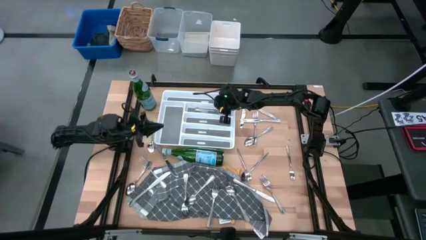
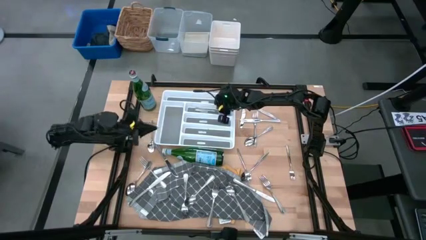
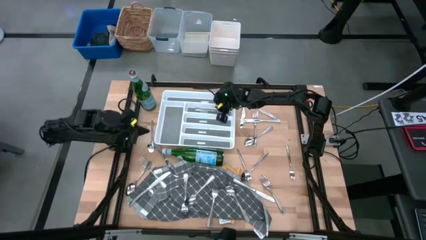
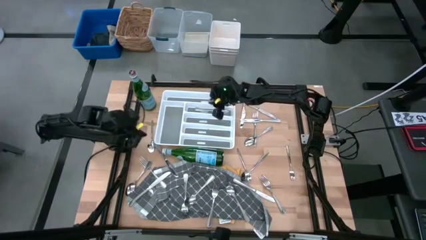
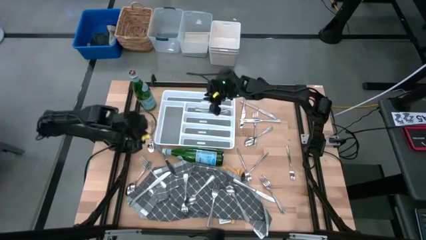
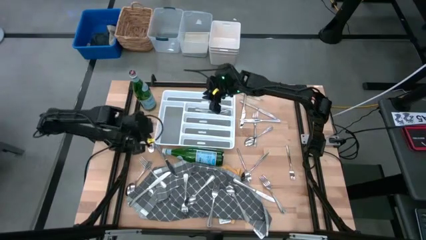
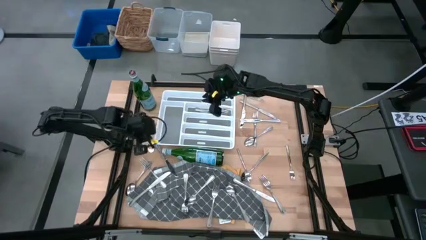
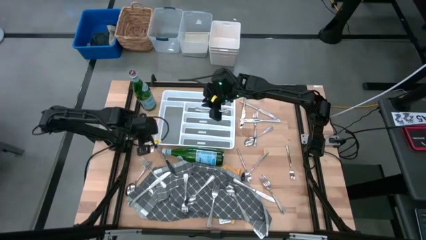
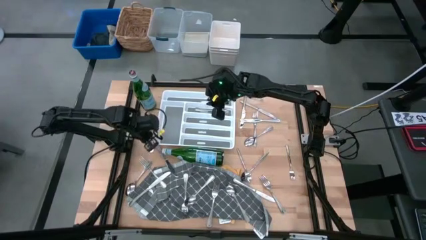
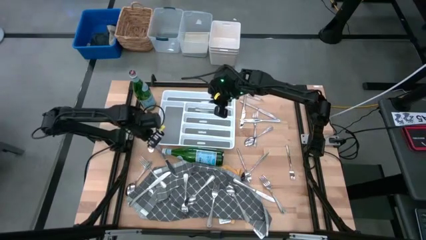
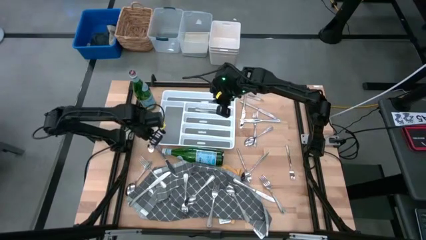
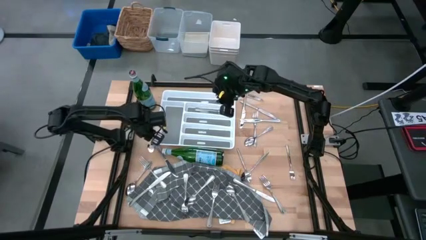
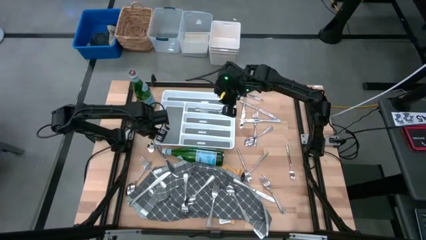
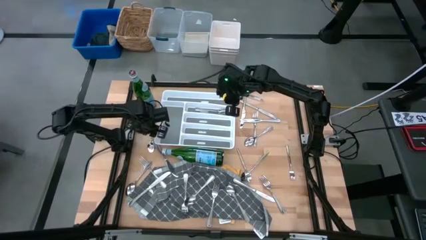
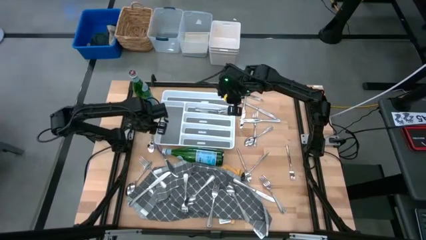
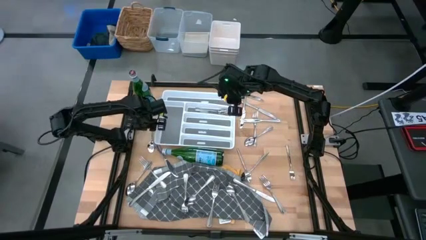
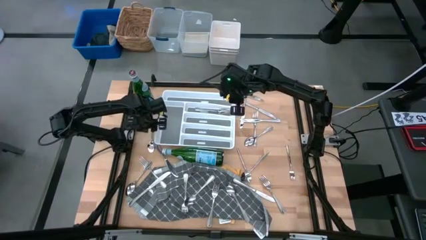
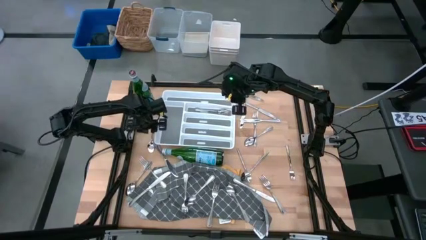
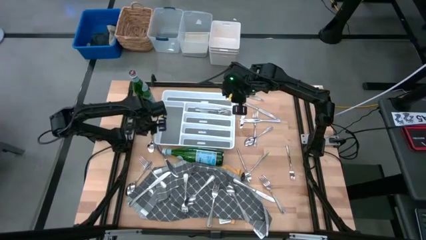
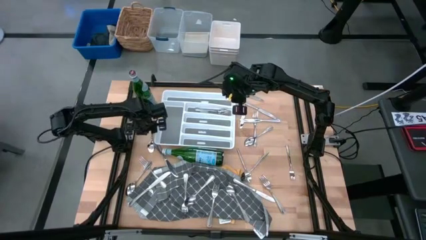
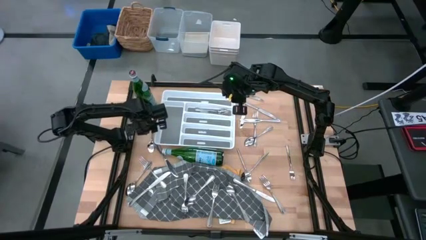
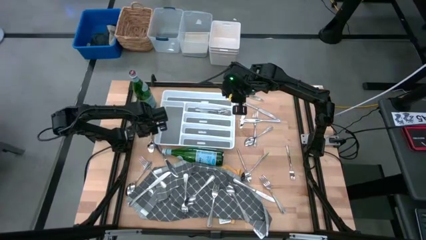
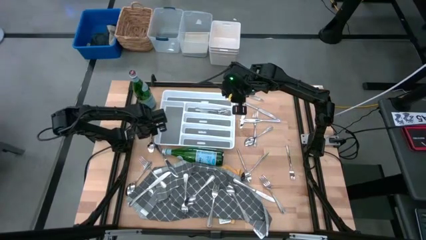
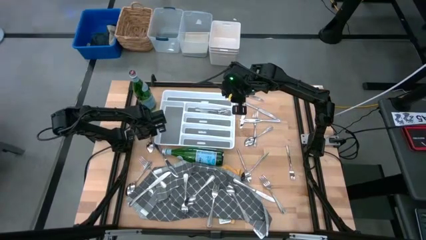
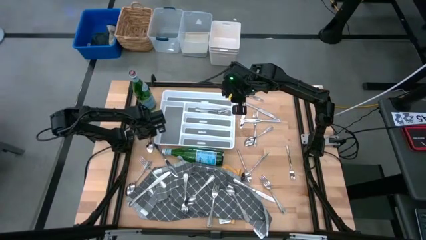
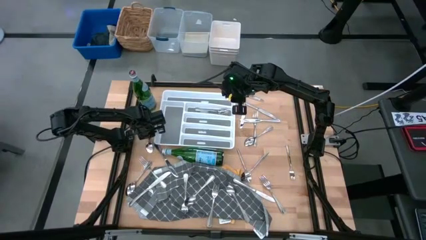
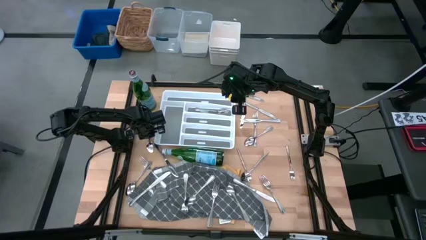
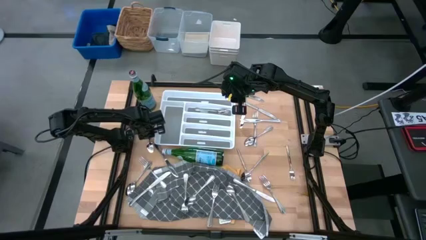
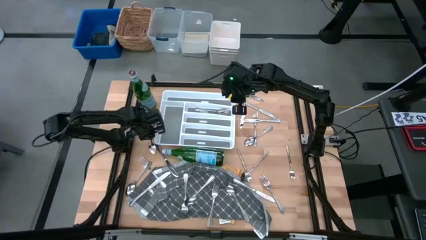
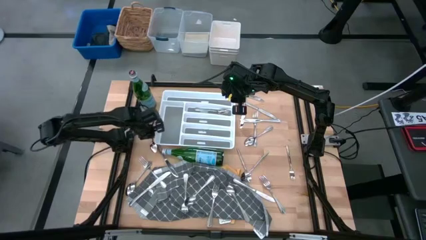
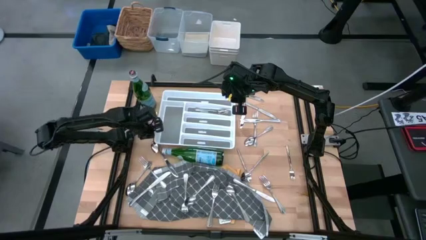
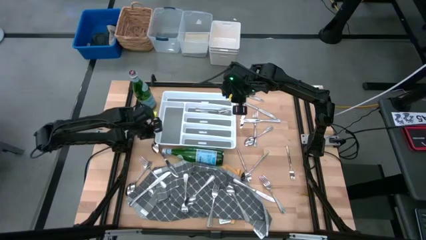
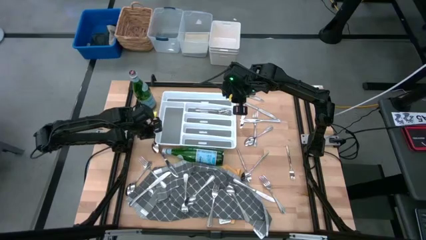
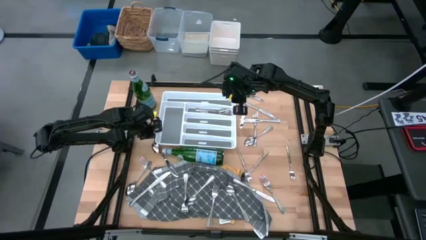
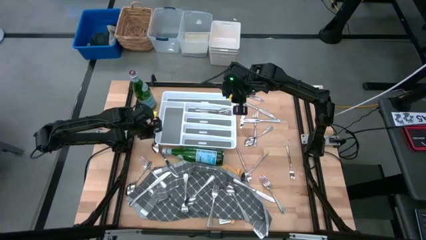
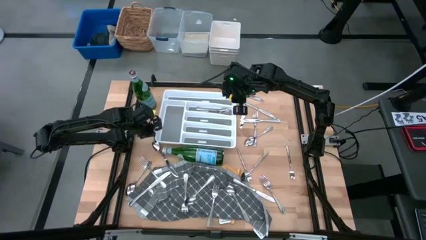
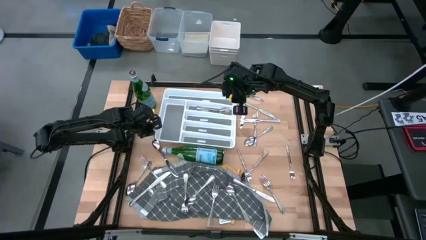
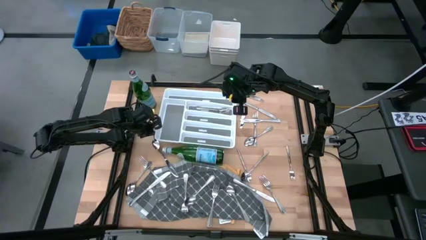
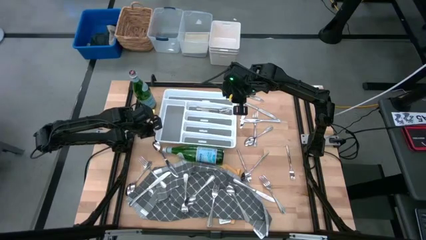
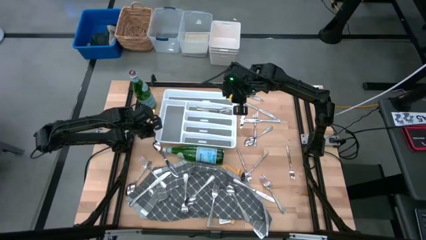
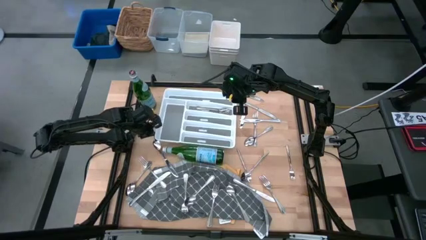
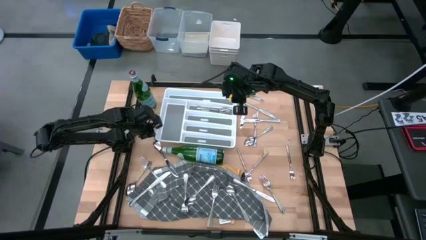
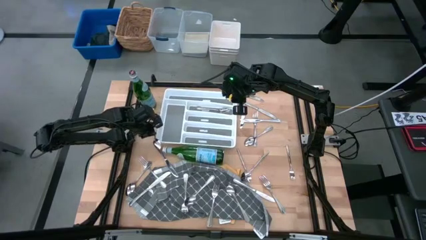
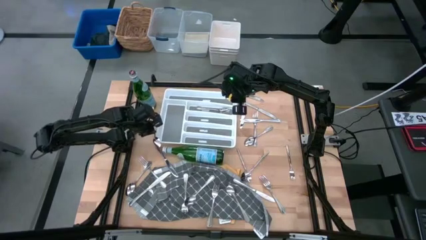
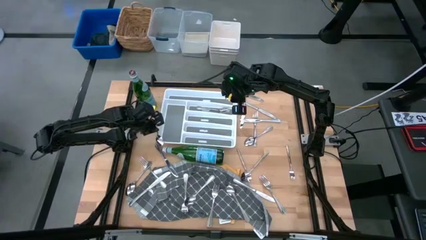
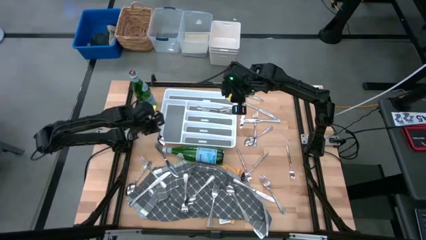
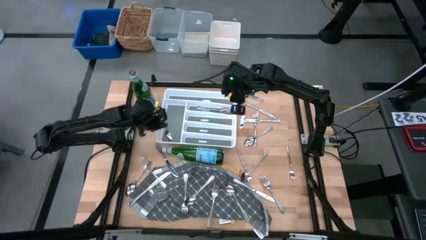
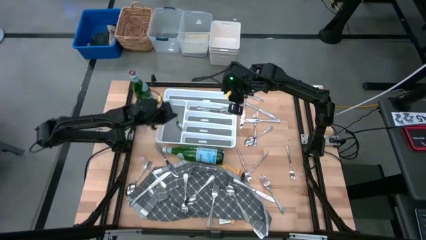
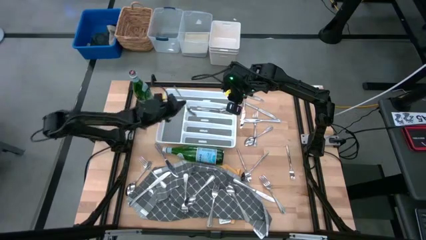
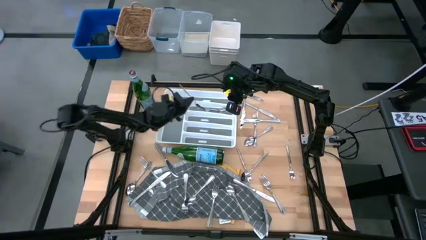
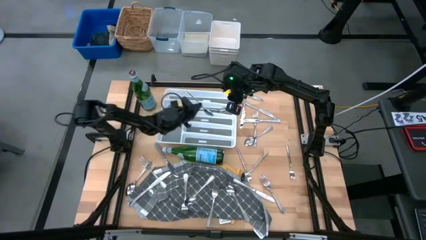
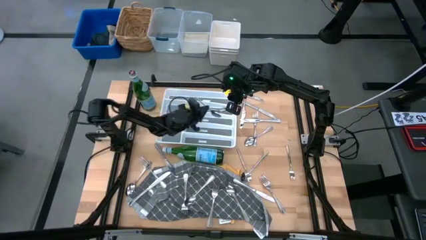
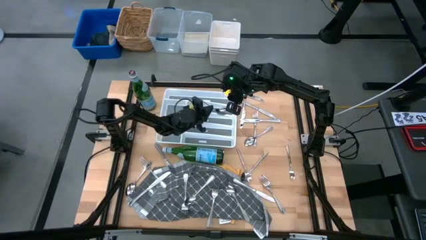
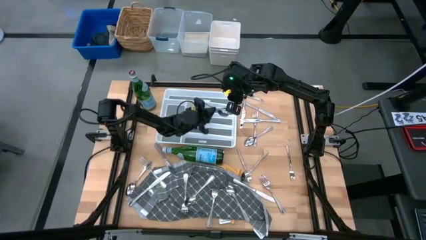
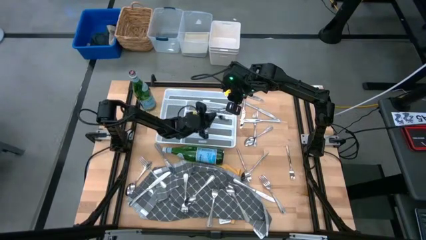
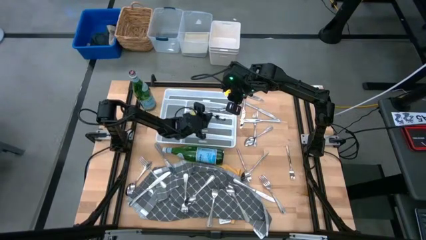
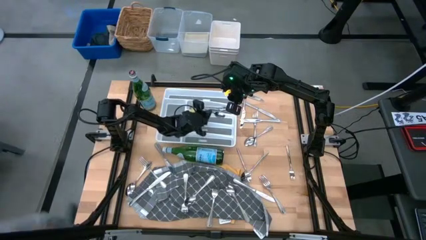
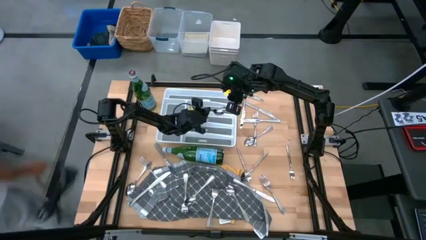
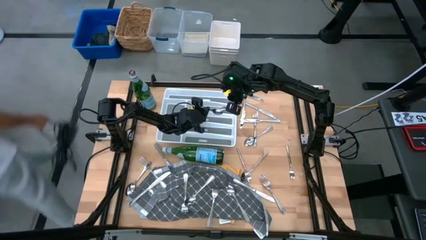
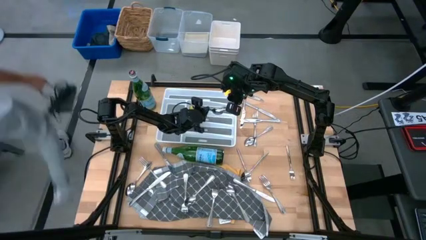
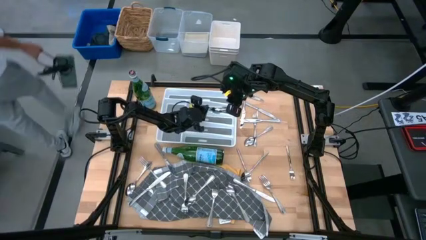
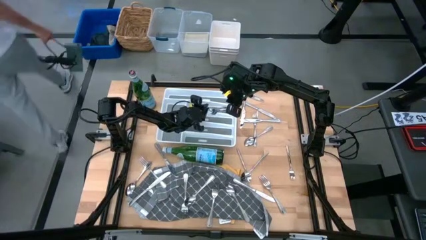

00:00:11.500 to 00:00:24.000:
Task: Sort silverware
Put the silver spoon into the silverware tray

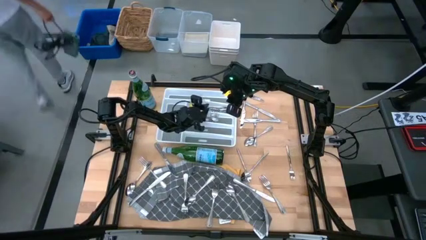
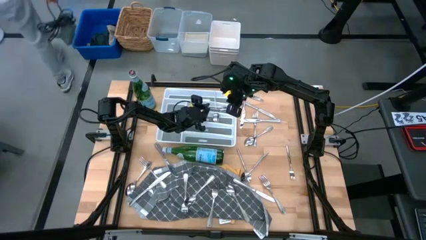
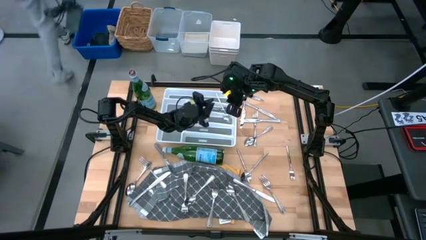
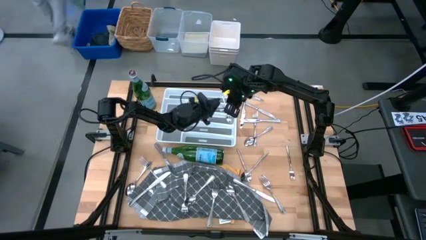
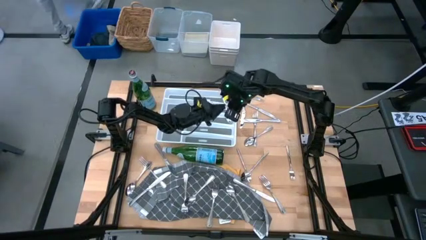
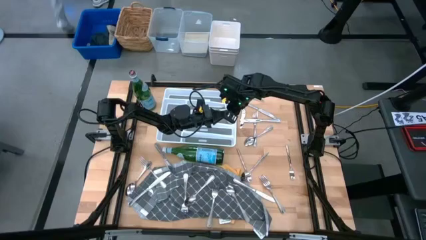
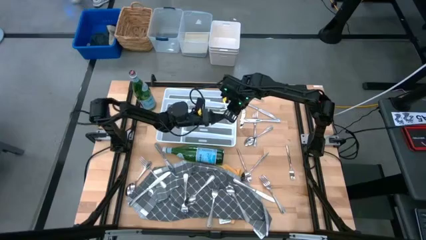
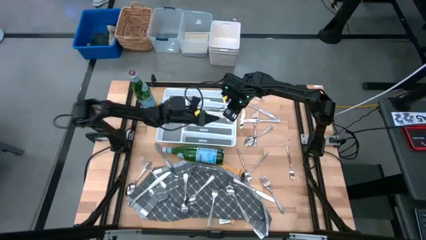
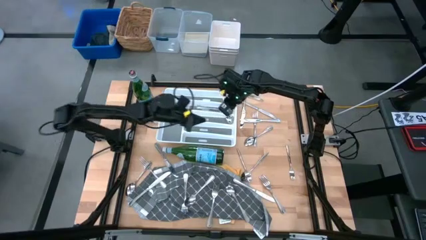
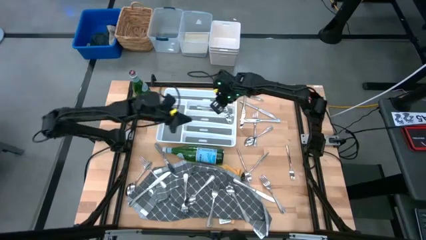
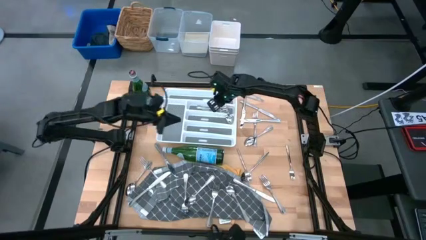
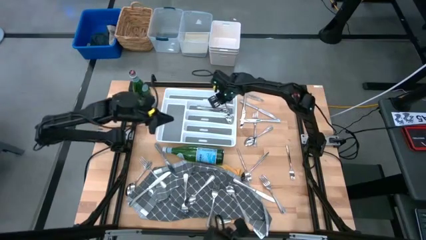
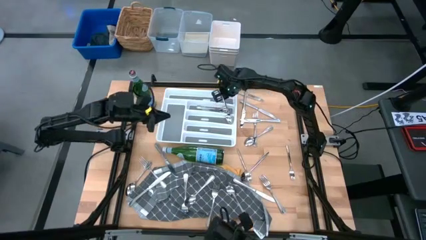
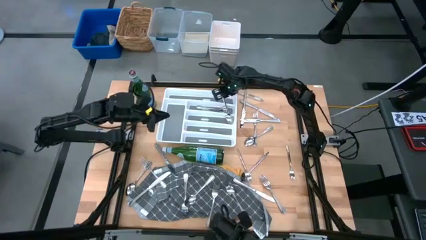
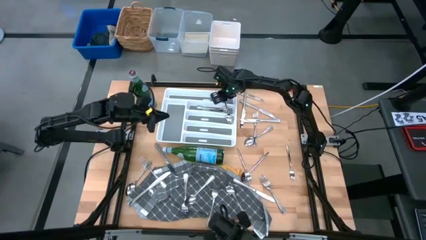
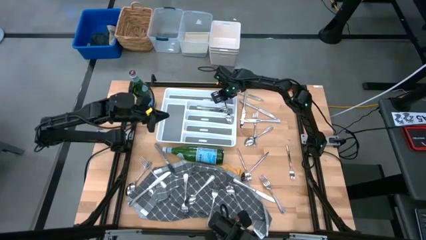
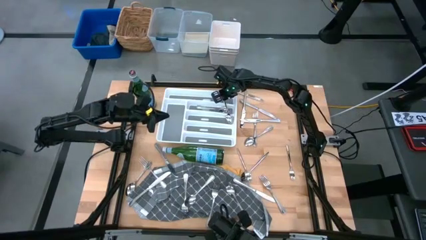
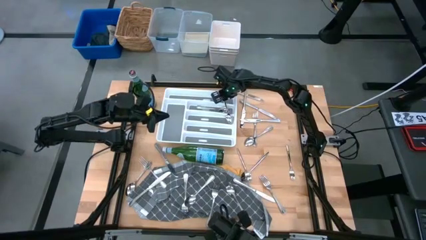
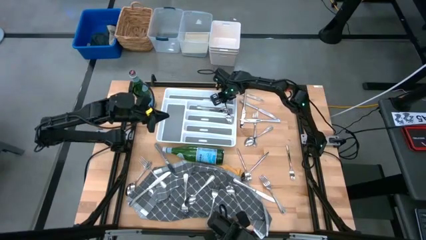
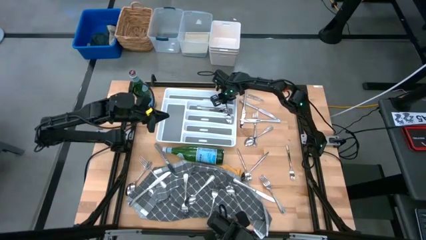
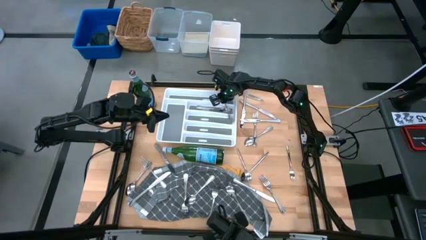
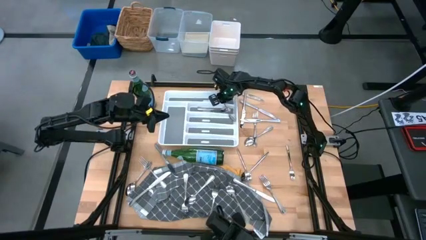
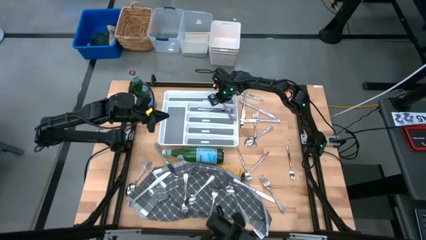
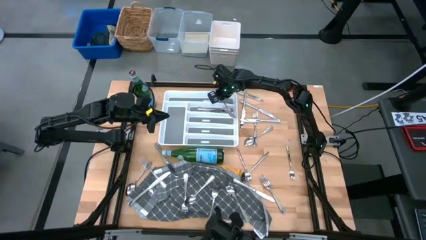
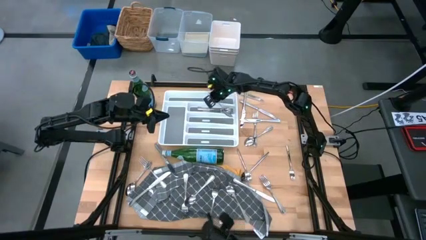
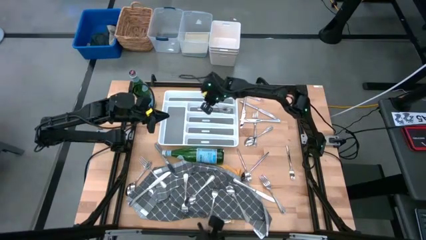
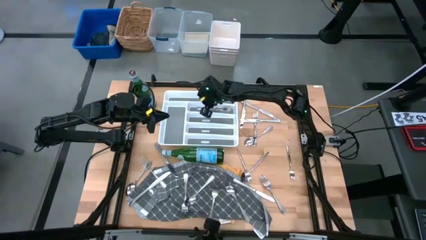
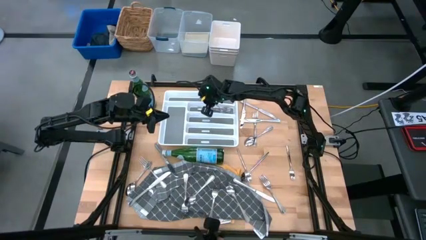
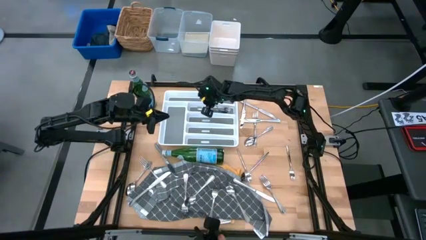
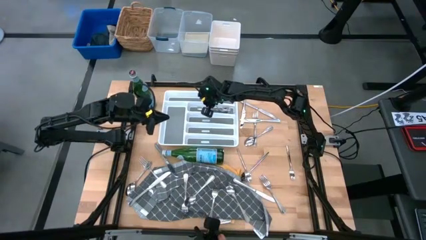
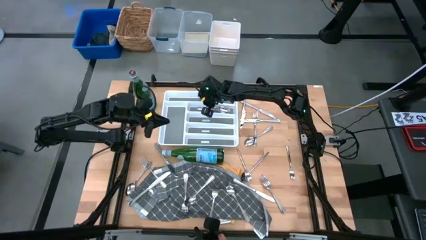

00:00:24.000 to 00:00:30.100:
Put the silver spoon into the silverware tray
